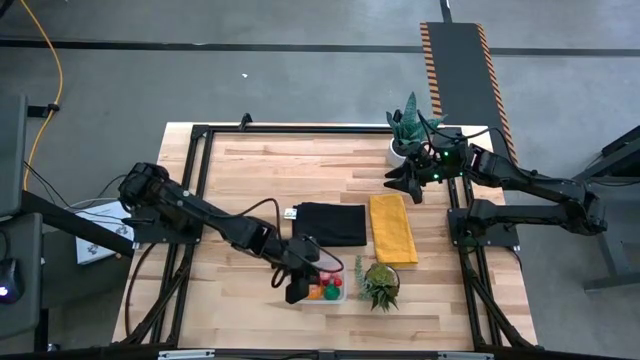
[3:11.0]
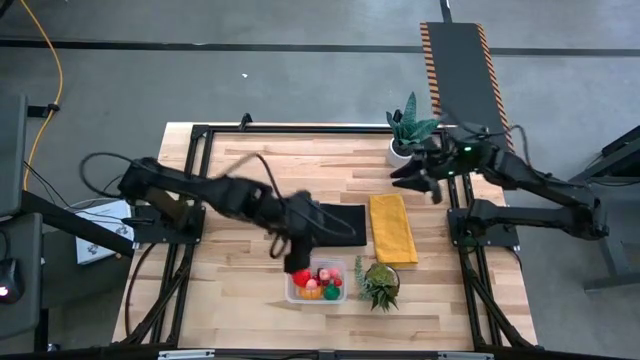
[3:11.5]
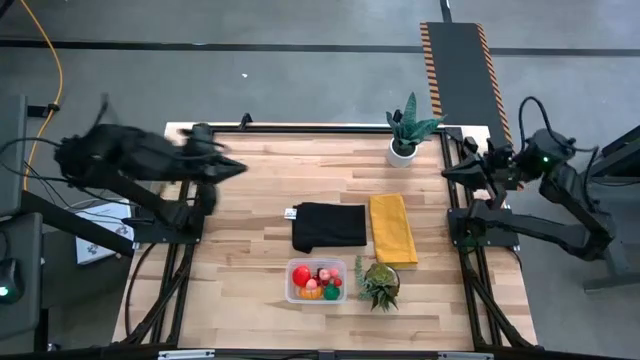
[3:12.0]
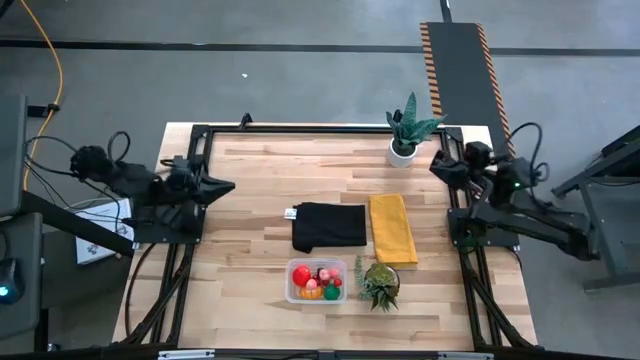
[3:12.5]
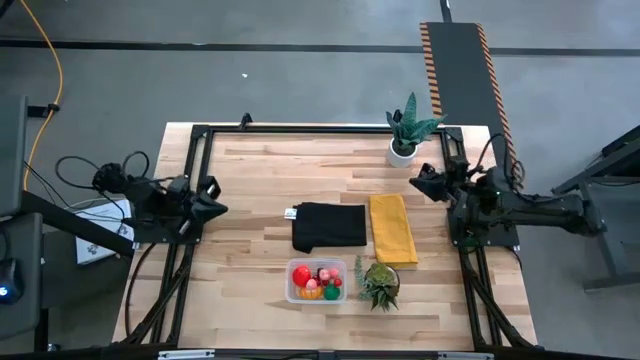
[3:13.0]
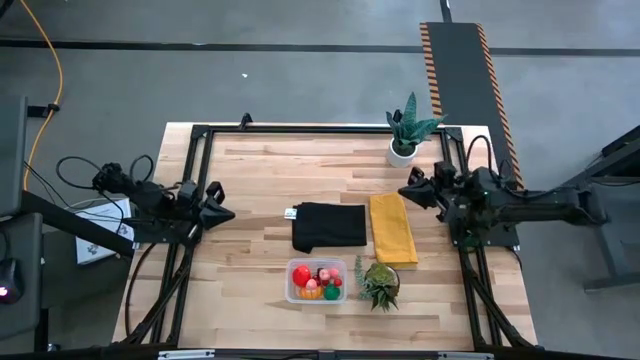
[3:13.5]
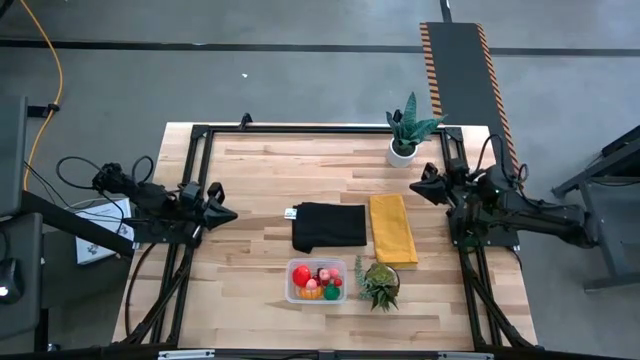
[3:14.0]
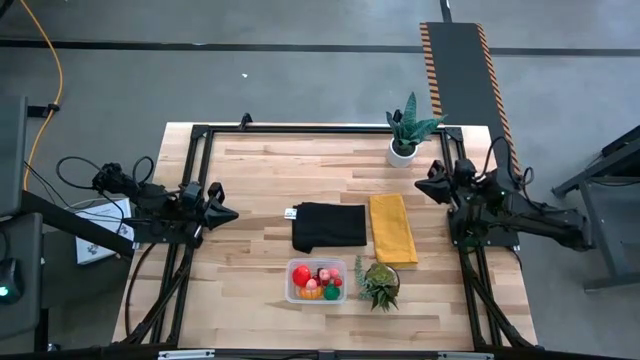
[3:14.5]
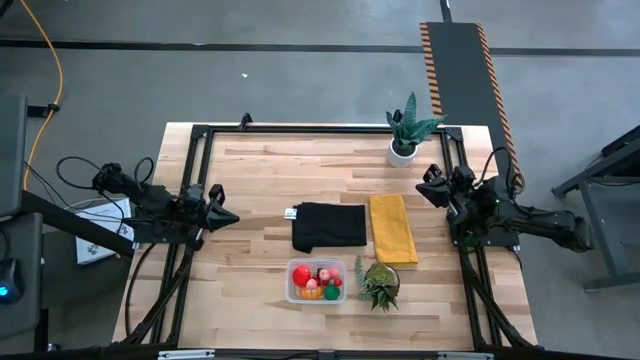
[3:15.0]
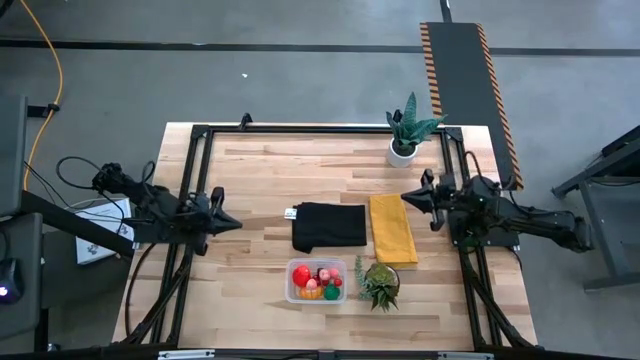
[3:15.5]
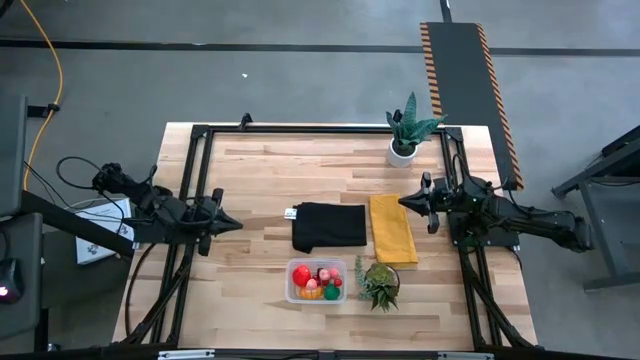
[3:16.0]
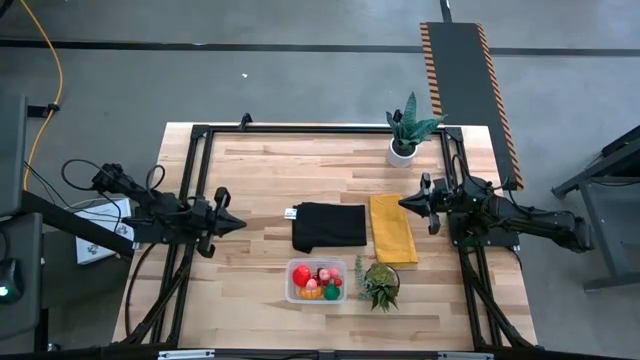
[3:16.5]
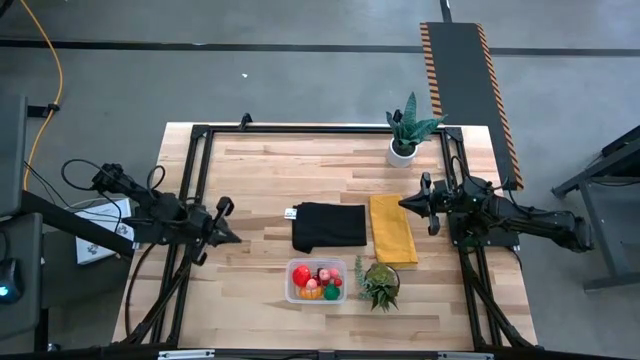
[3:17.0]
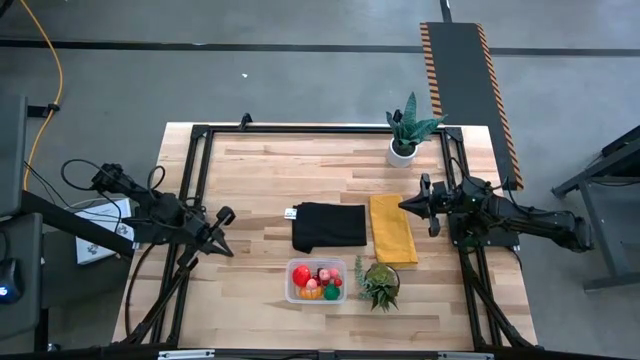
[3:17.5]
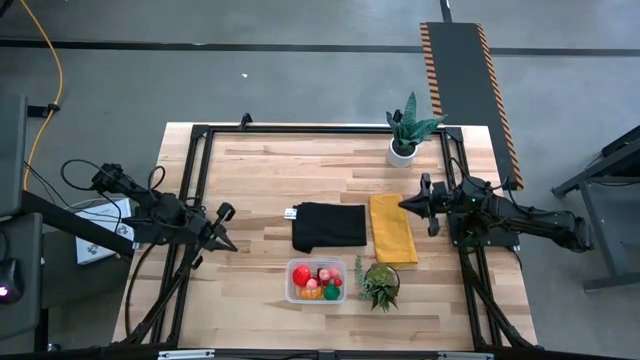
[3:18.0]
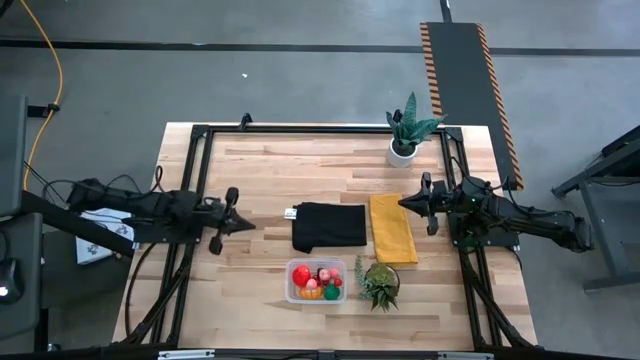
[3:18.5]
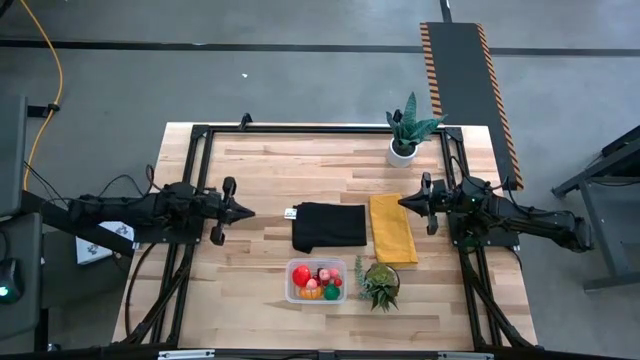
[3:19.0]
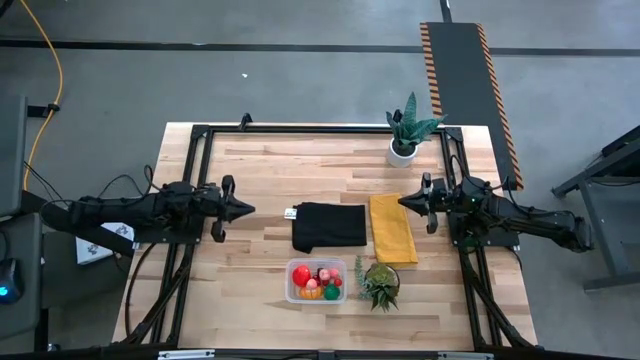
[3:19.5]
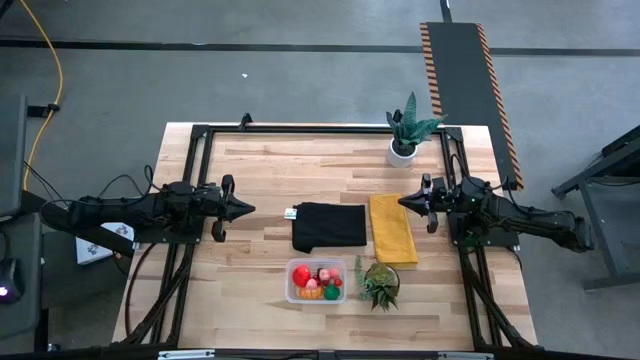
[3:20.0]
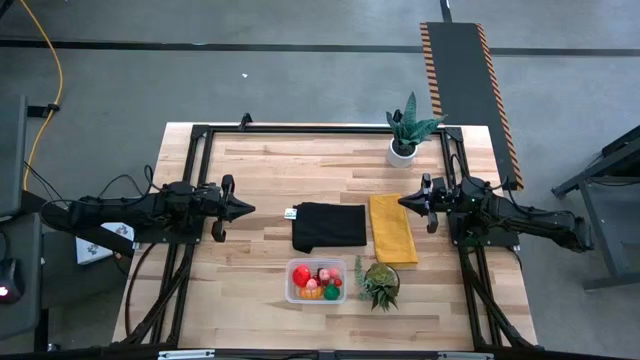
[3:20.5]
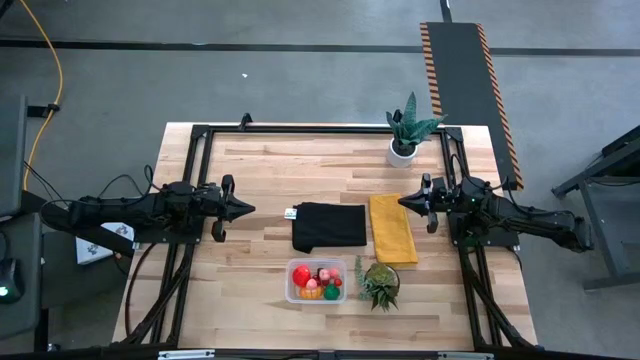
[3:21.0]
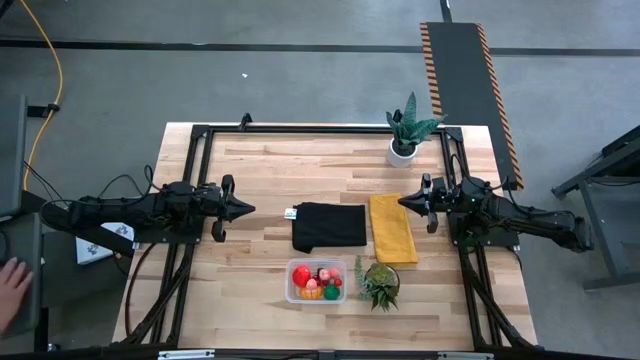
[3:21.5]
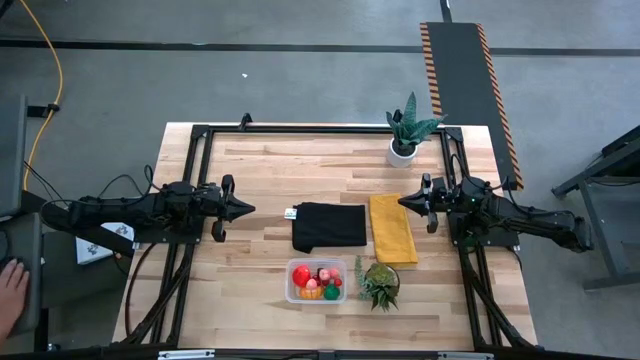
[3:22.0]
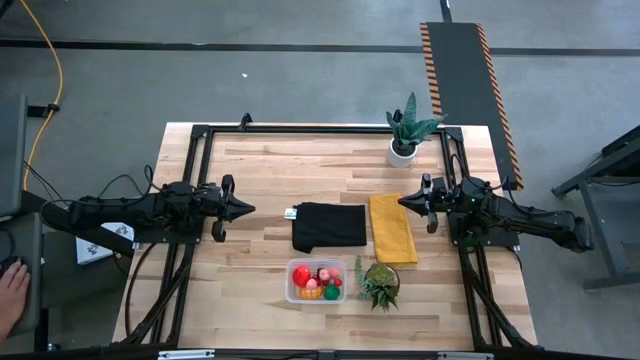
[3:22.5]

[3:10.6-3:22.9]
Task: Pick and placing Produce into tupperware
Return to home position

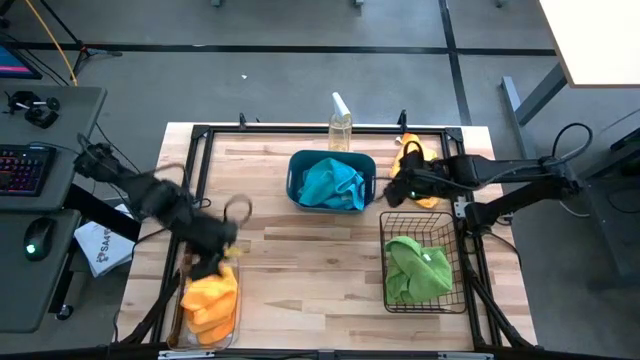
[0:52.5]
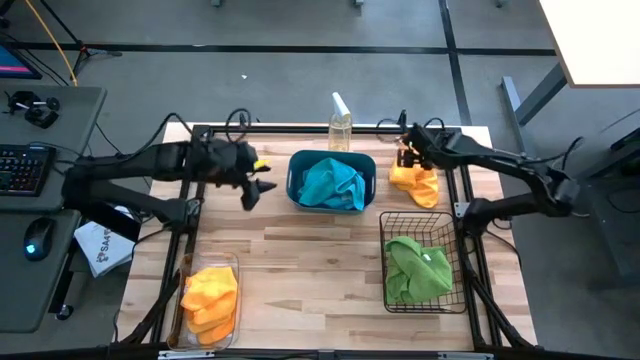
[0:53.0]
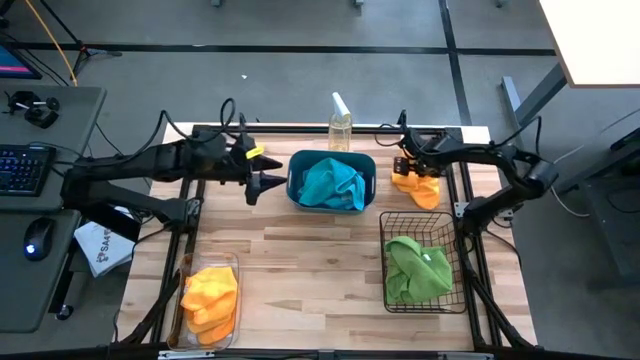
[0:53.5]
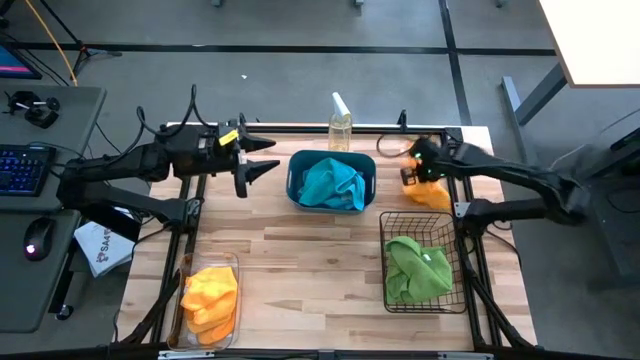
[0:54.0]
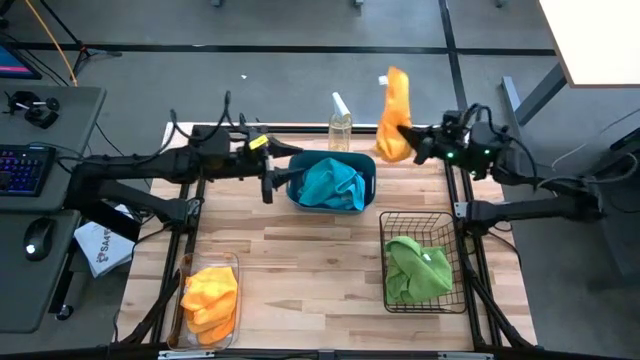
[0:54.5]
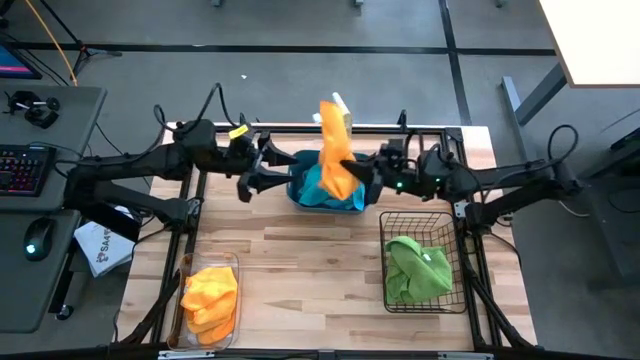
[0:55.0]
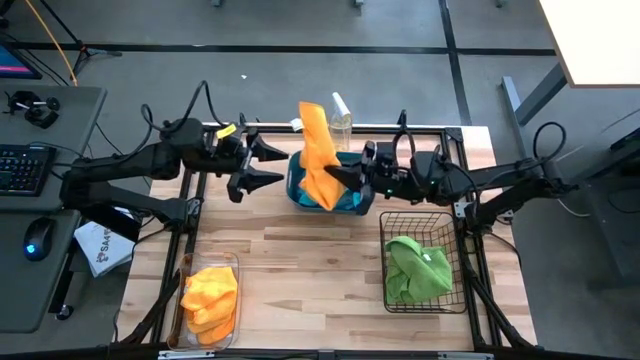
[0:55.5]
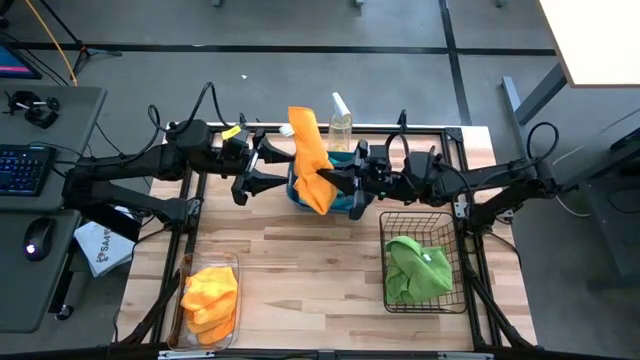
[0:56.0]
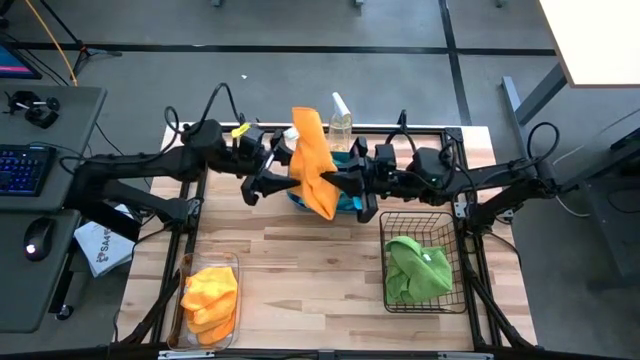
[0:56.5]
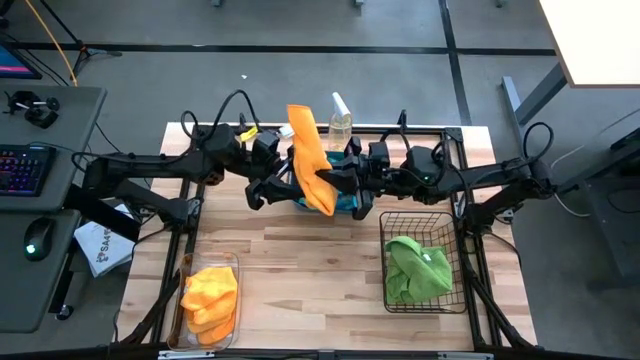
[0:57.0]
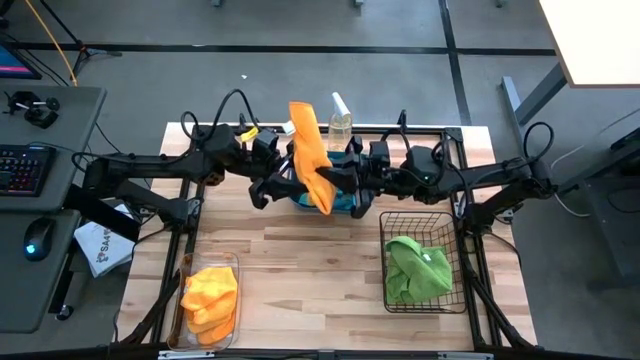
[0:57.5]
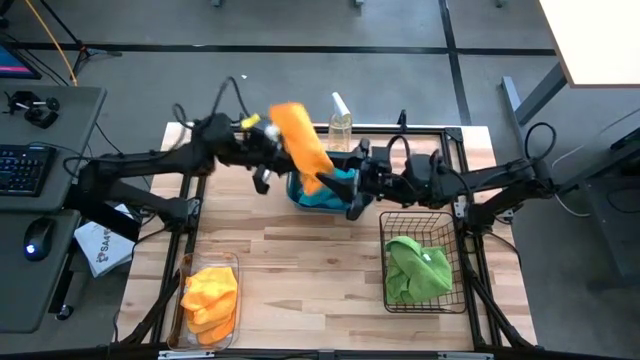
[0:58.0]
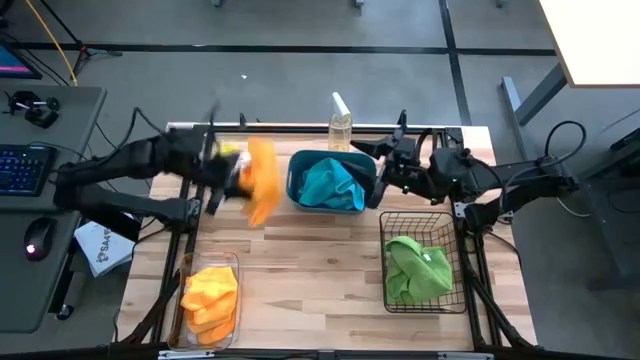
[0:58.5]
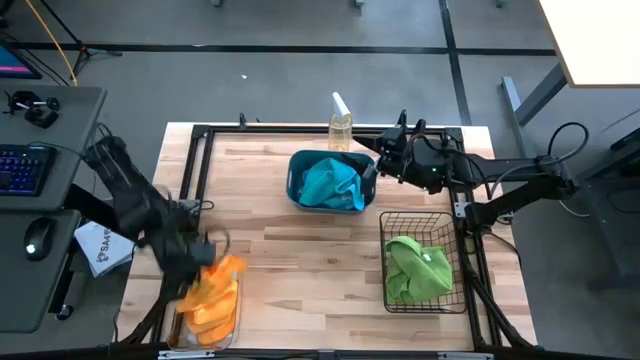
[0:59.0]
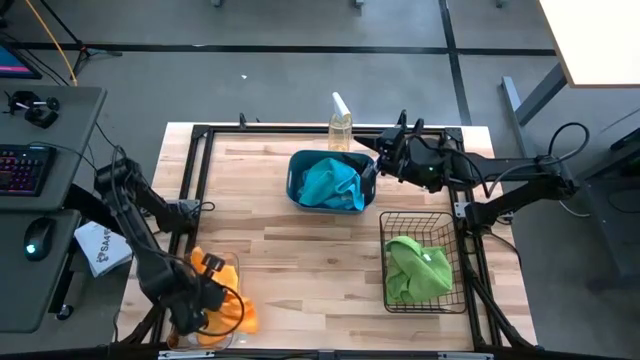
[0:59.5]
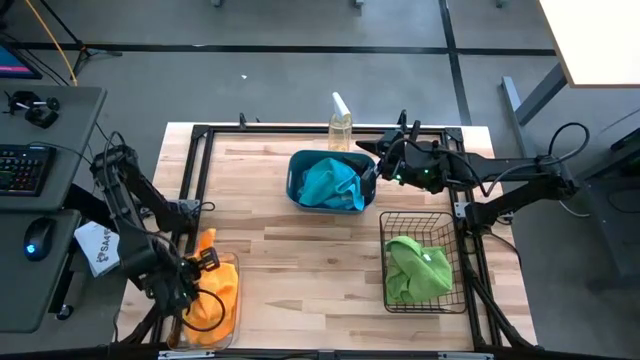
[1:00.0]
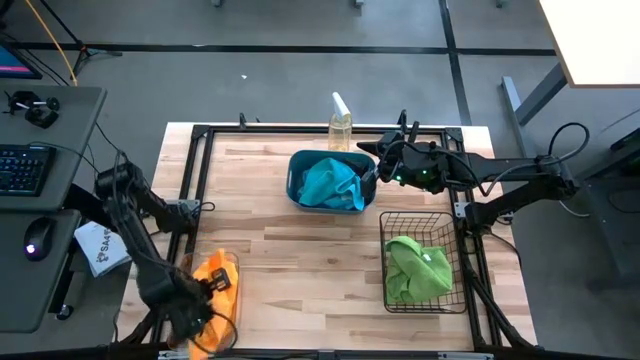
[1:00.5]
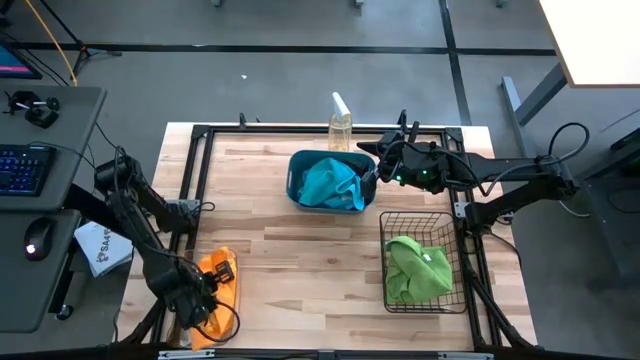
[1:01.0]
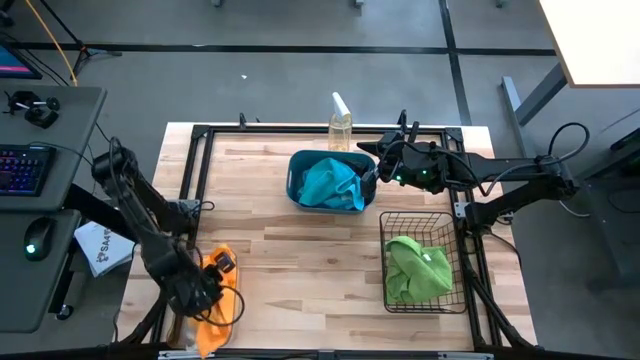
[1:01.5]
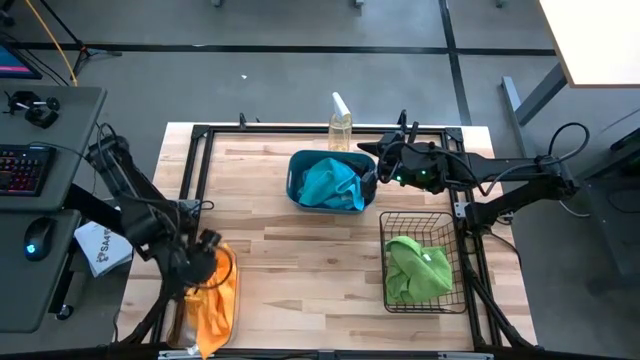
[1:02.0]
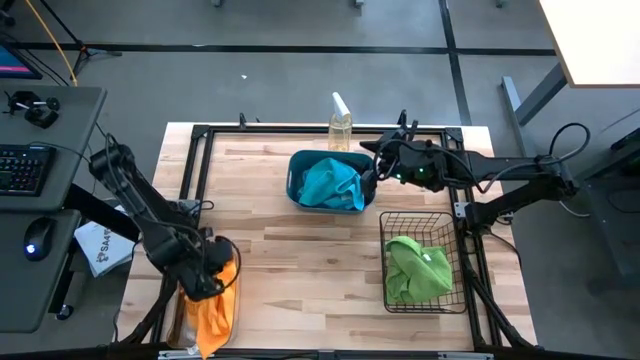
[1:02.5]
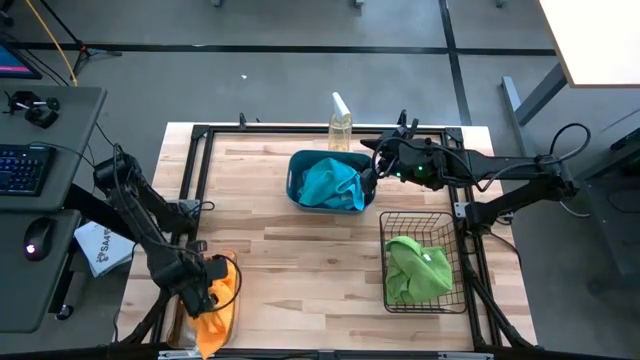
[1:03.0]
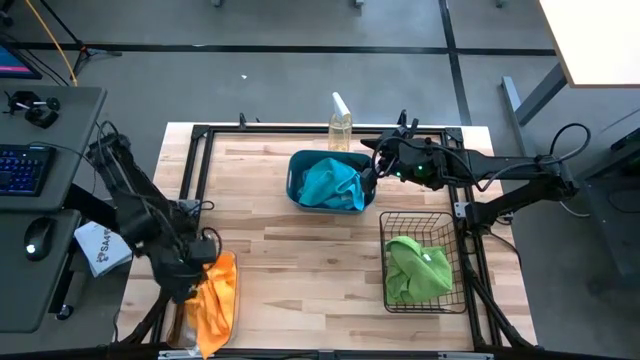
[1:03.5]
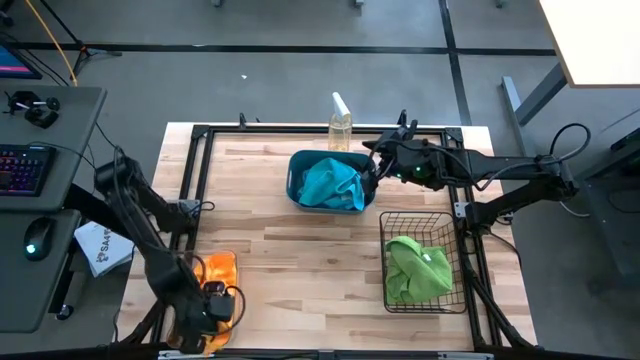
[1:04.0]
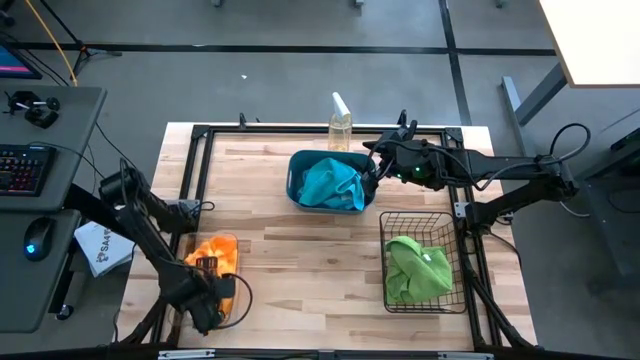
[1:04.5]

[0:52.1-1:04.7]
Task: Sort microfiber towel by color & place in baskets
Put the orange towel into the transparent bin
